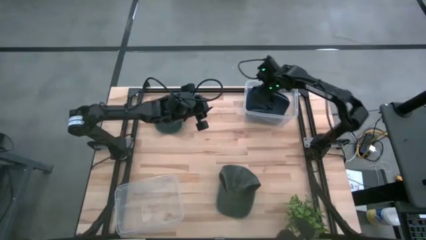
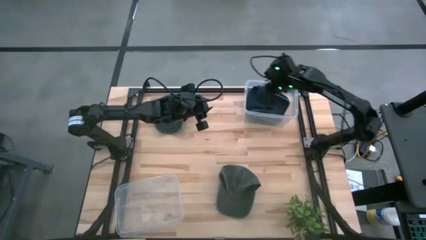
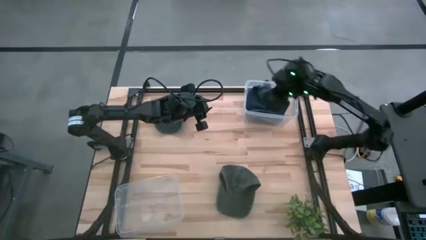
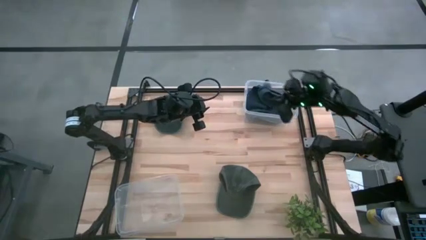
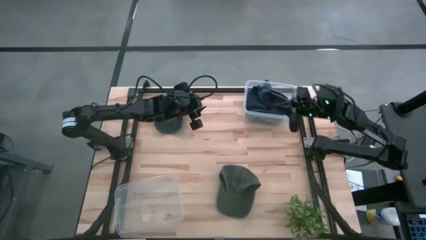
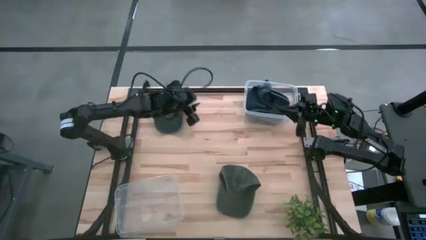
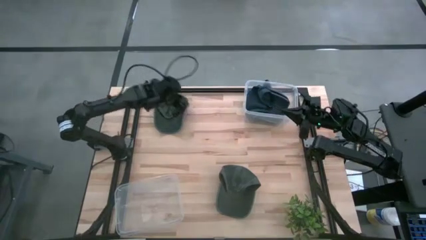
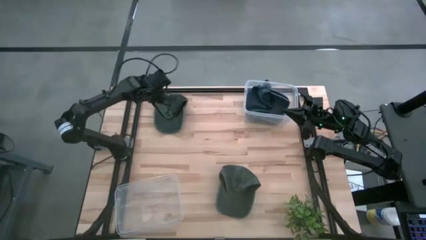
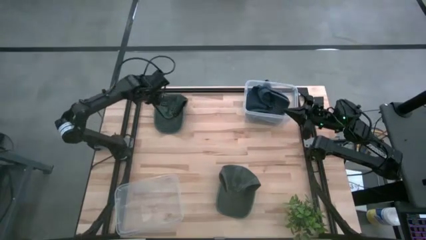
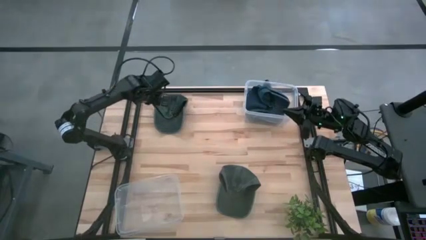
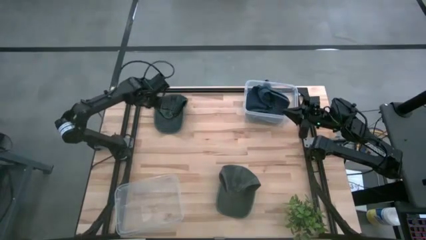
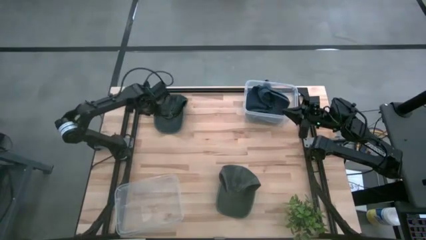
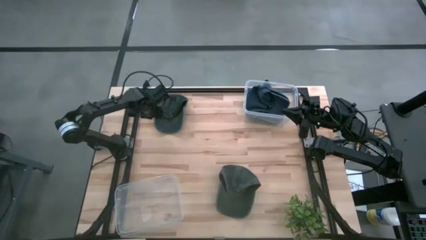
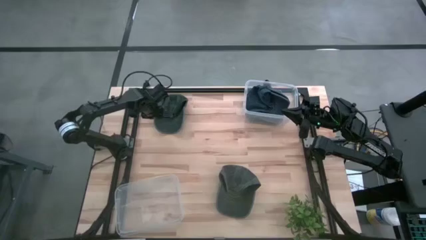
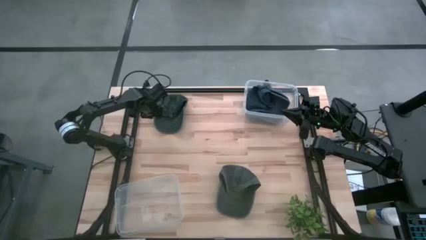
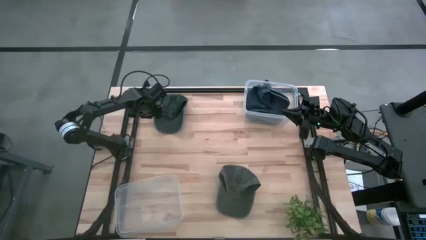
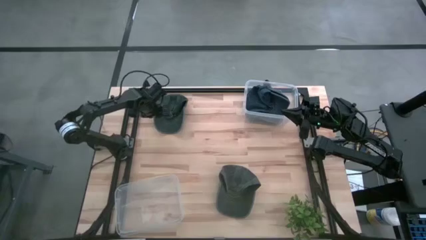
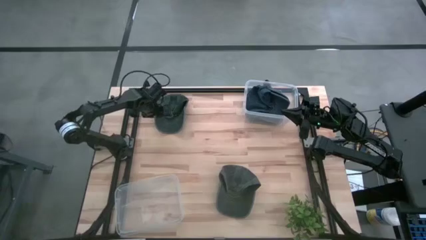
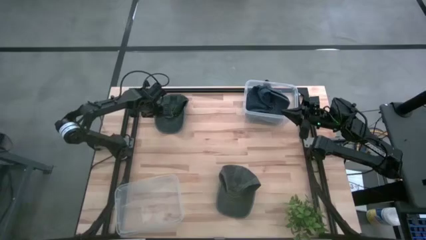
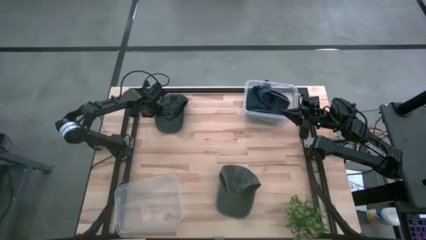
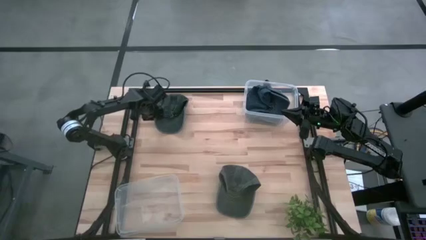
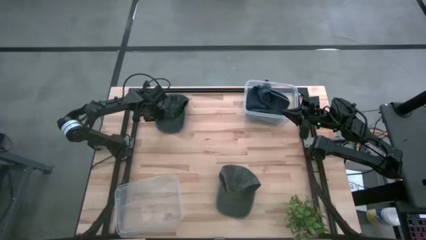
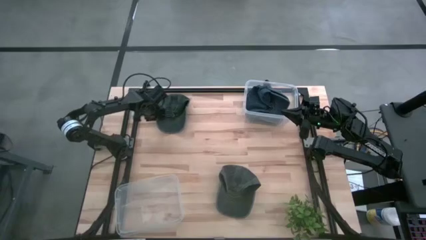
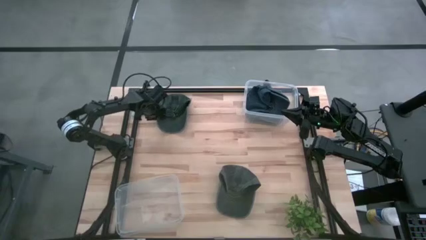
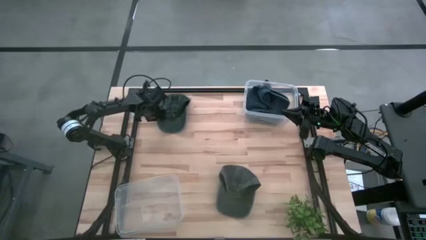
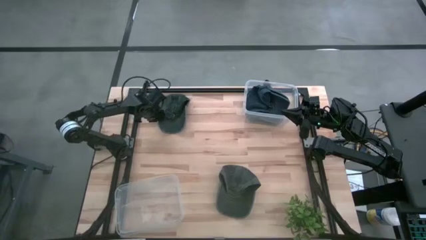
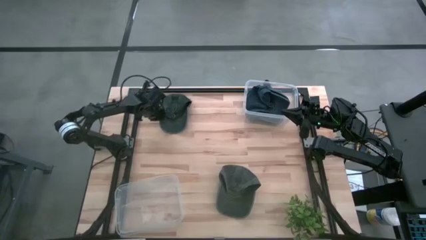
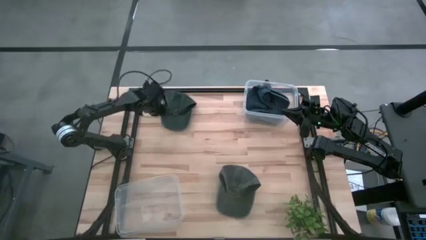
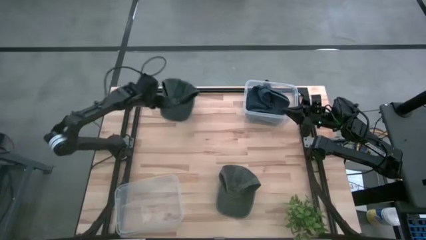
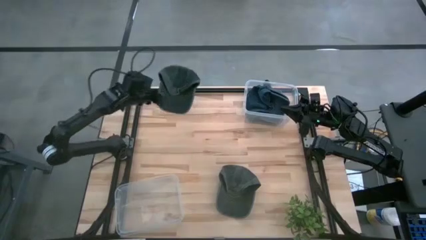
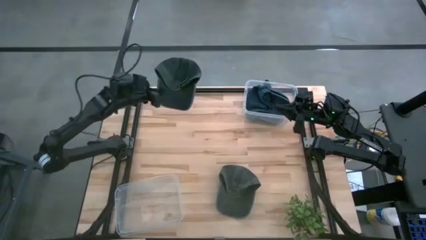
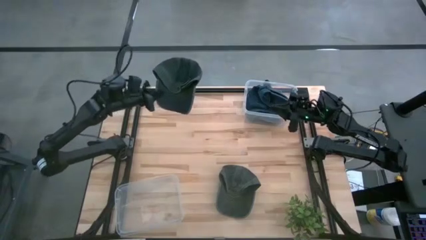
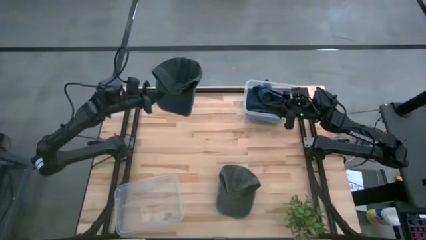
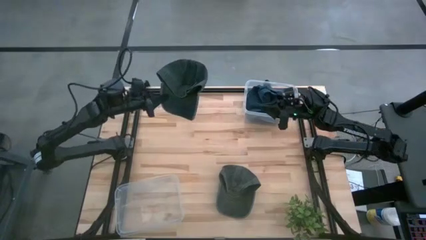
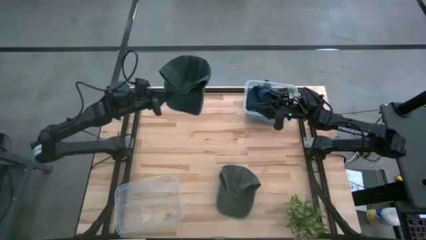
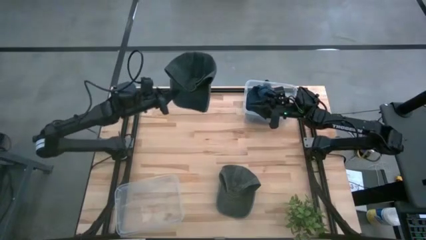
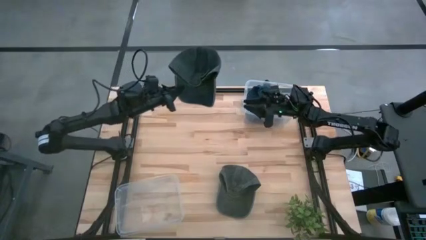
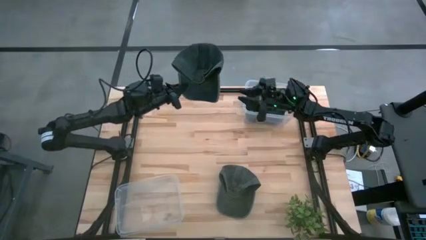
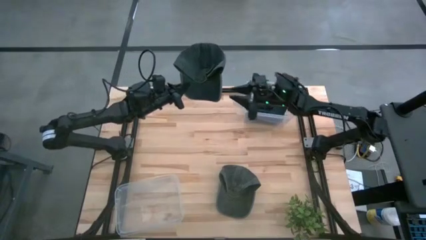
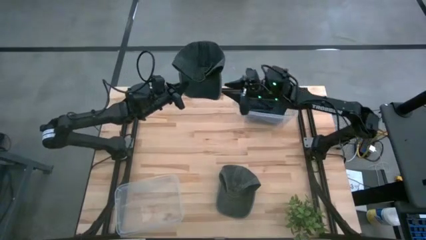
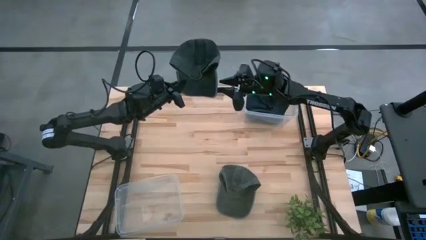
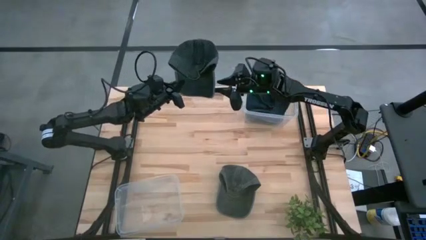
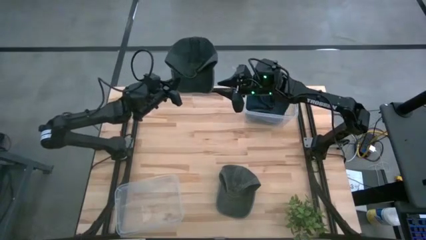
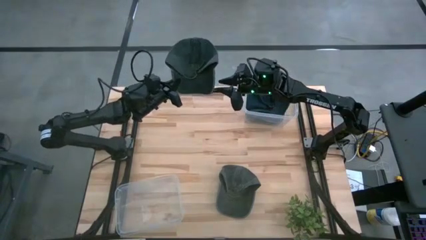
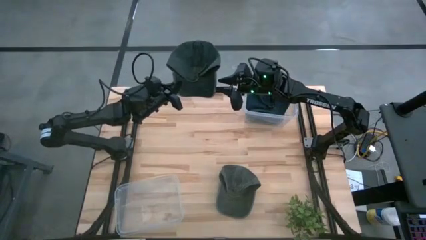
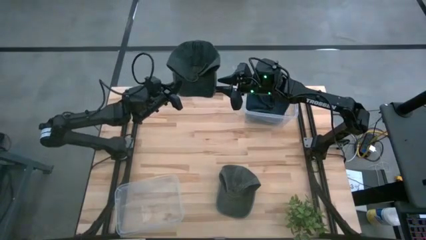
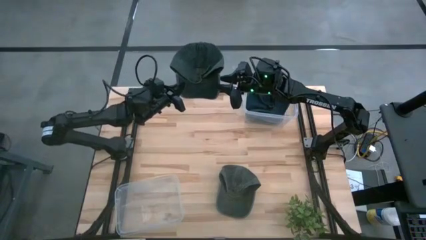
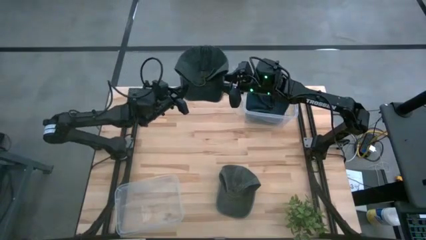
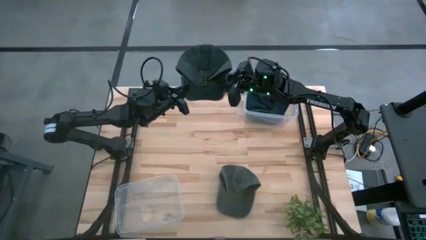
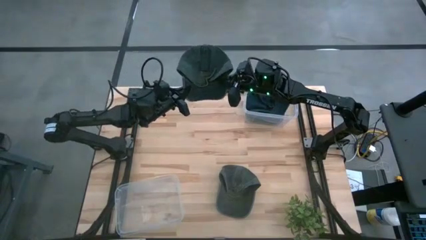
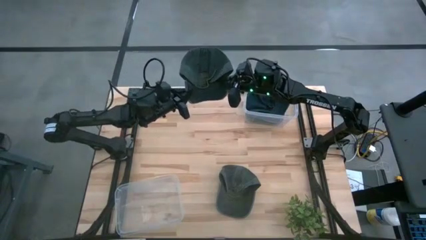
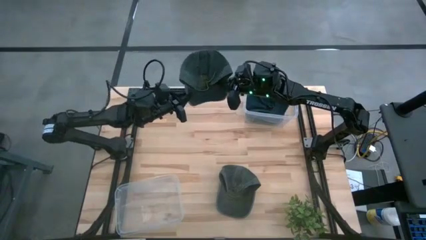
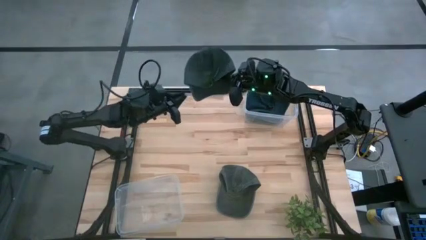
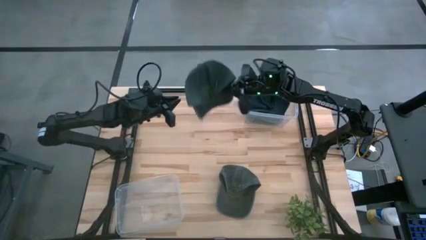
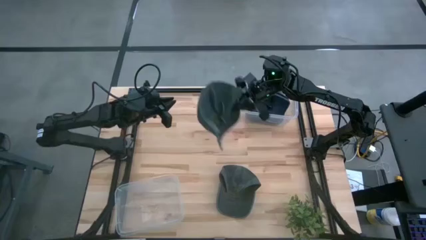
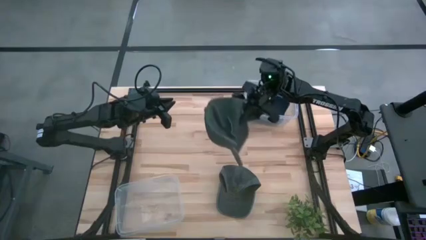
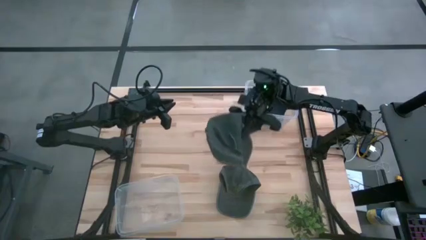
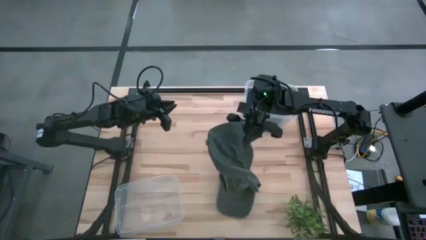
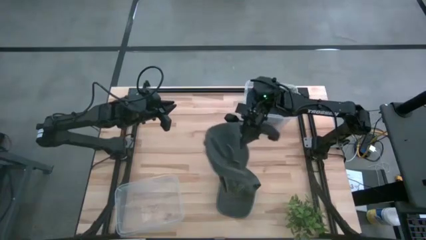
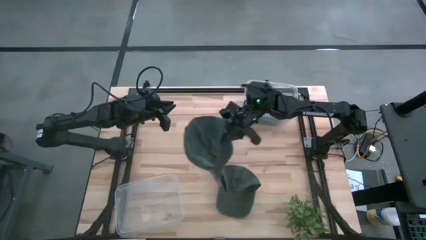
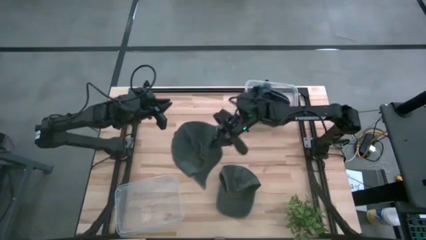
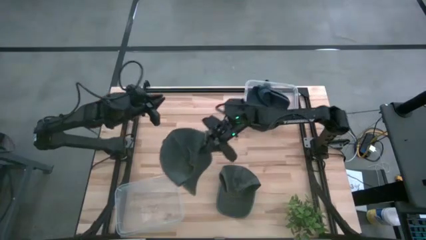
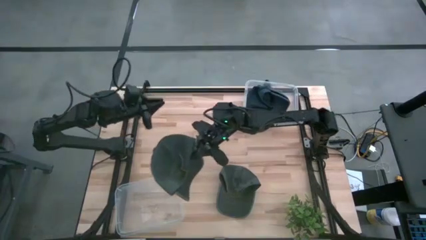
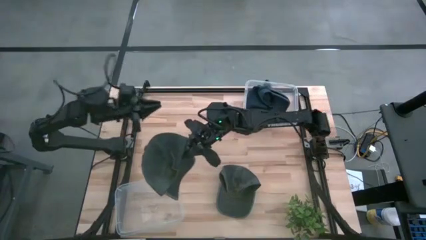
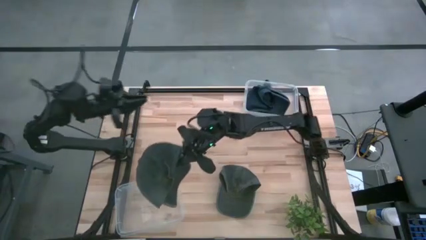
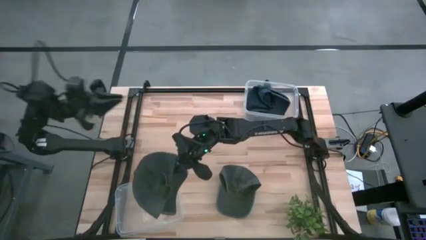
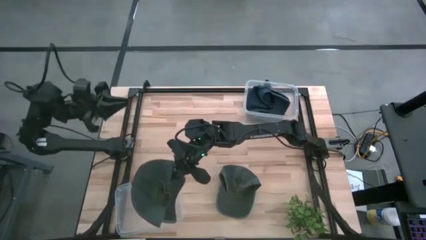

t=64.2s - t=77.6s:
Task: Pick & Place hat
Put the top gray cap into the bottom transparent bin

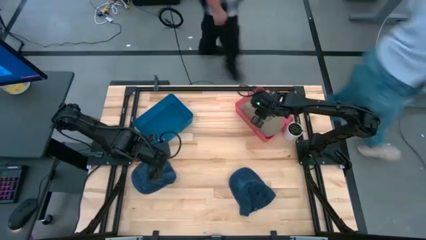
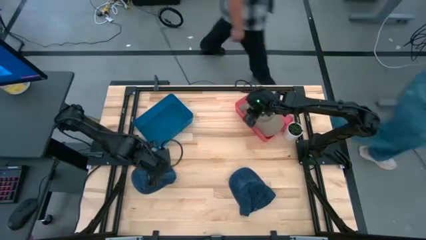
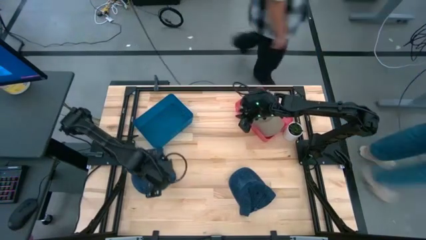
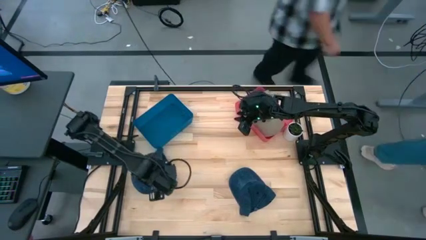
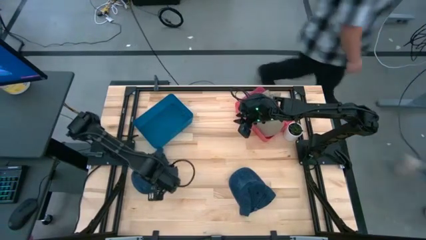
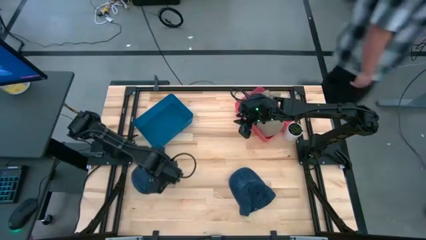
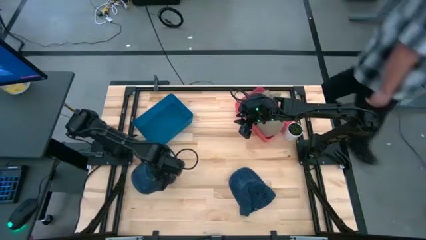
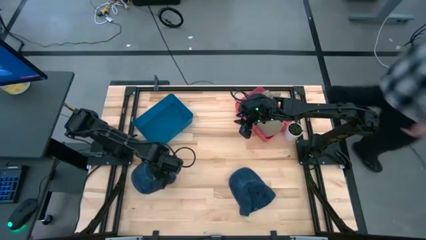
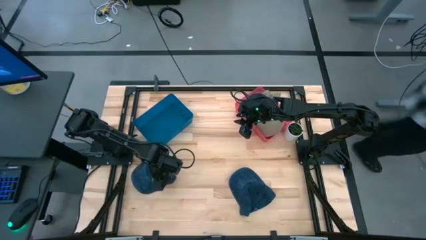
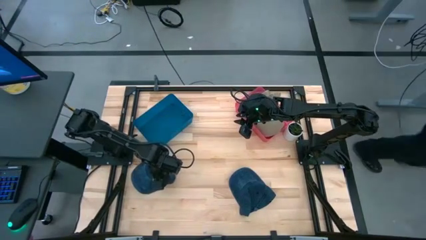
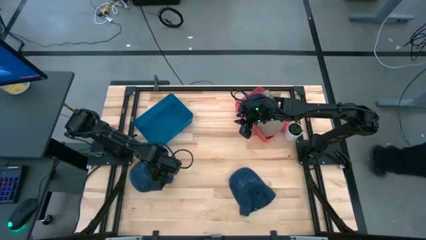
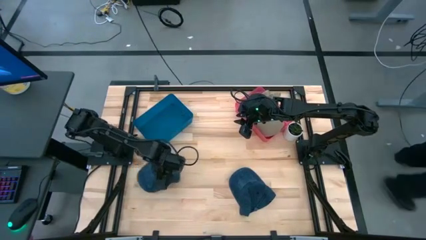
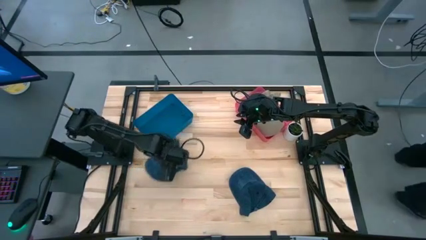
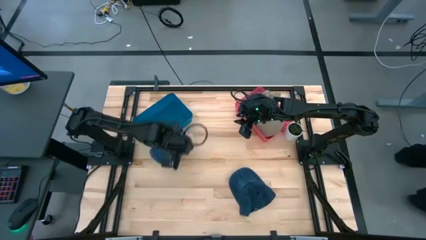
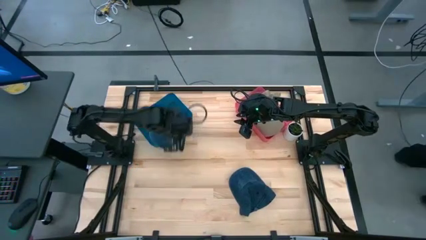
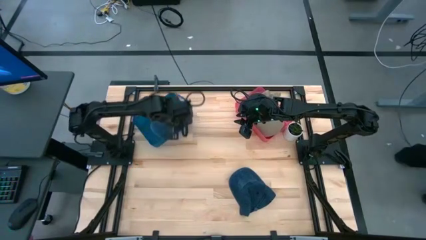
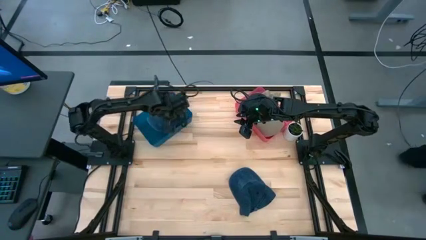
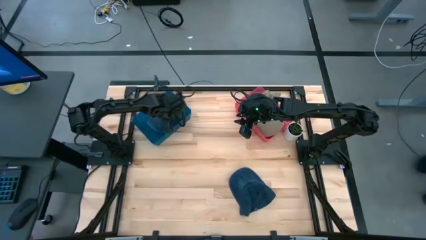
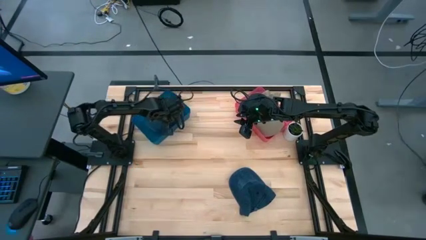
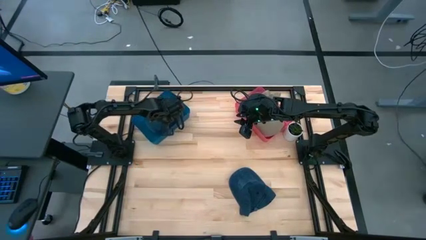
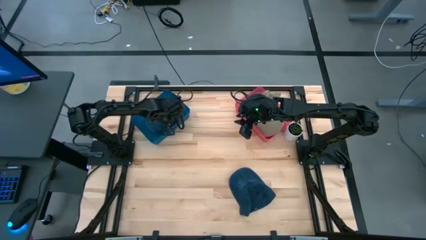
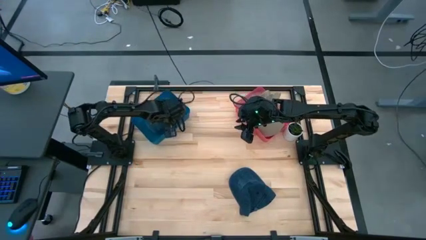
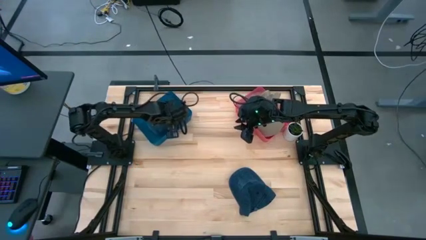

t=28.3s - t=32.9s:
Task: Pick & Place hat
Put the left blue cap into the blue bin
